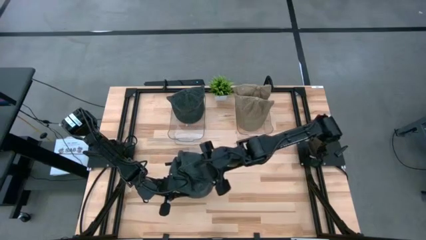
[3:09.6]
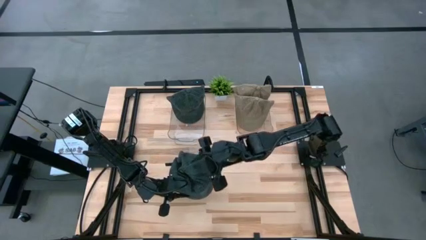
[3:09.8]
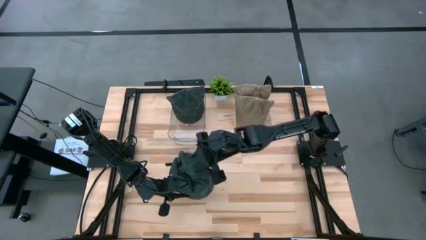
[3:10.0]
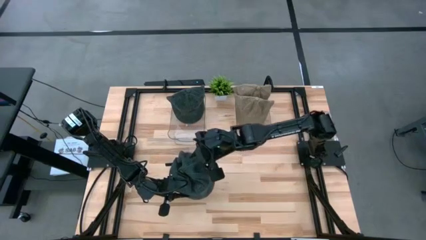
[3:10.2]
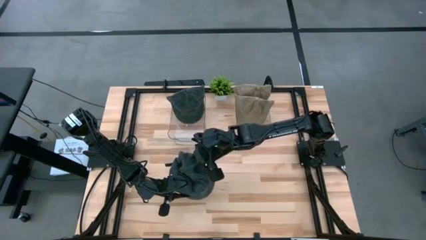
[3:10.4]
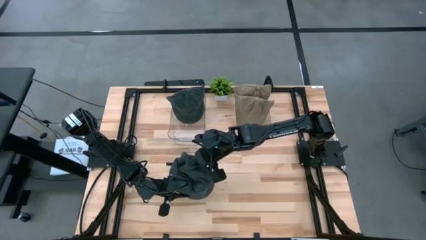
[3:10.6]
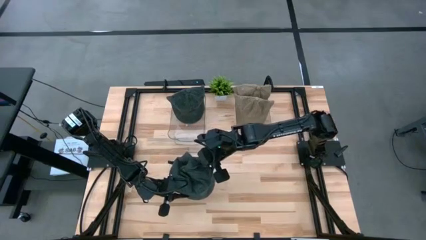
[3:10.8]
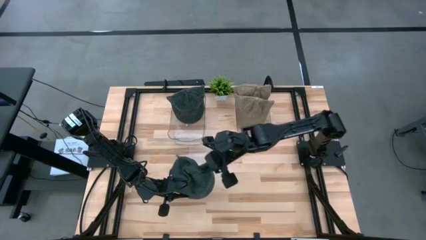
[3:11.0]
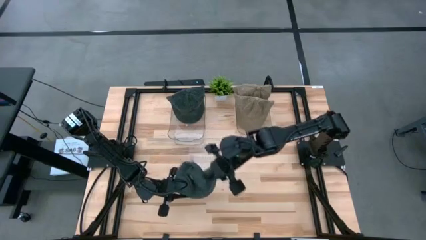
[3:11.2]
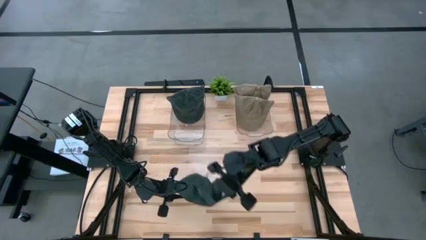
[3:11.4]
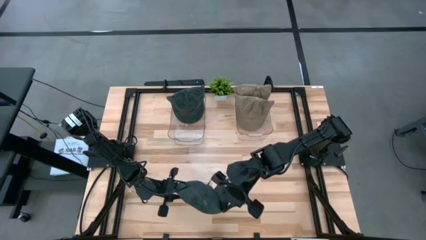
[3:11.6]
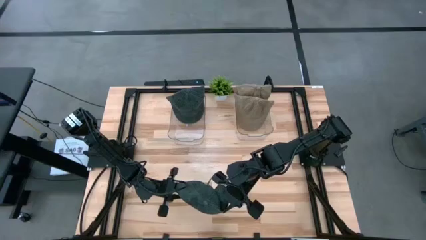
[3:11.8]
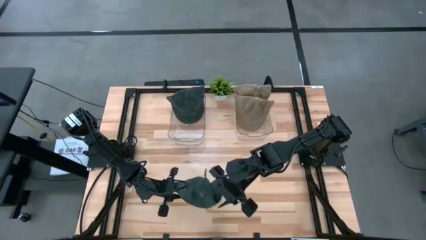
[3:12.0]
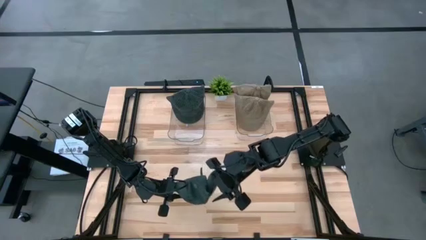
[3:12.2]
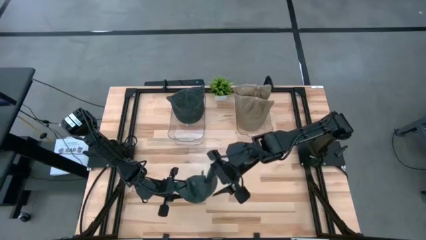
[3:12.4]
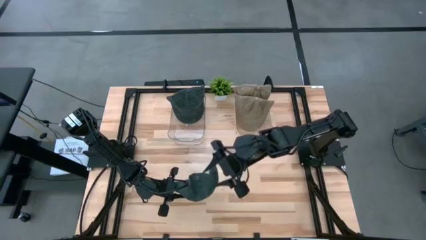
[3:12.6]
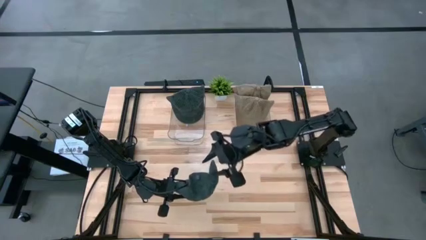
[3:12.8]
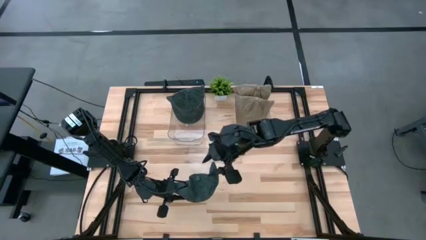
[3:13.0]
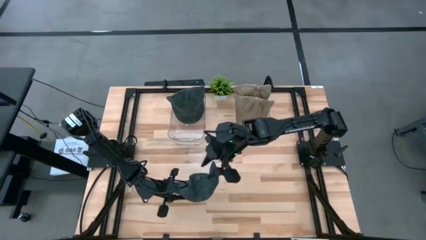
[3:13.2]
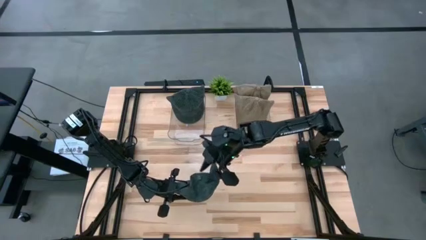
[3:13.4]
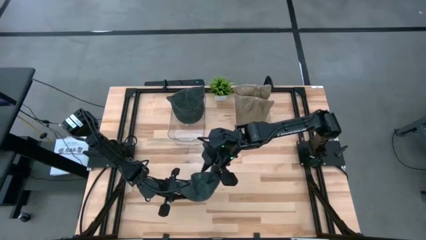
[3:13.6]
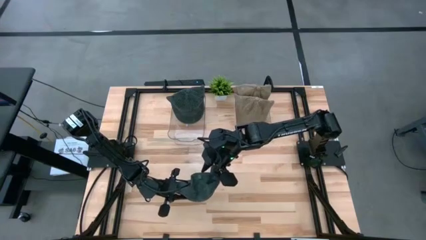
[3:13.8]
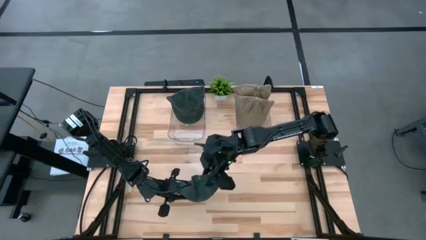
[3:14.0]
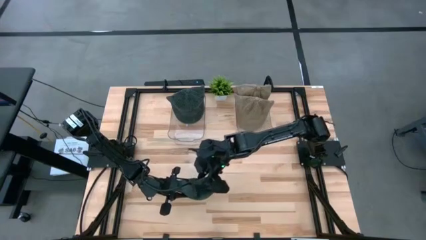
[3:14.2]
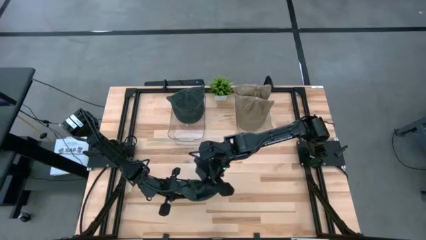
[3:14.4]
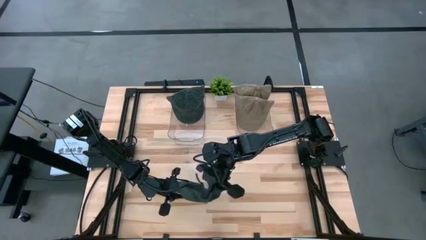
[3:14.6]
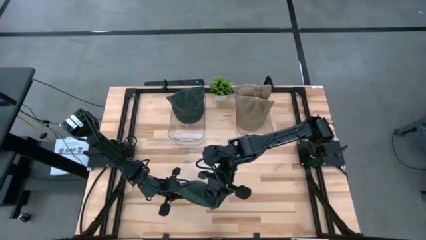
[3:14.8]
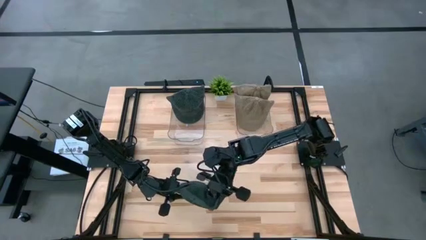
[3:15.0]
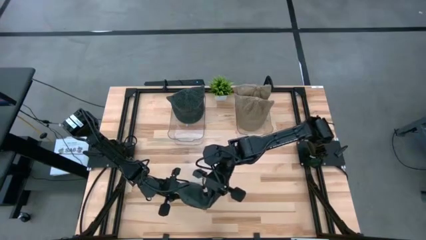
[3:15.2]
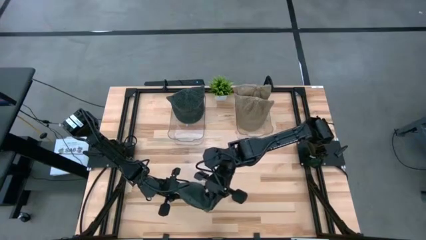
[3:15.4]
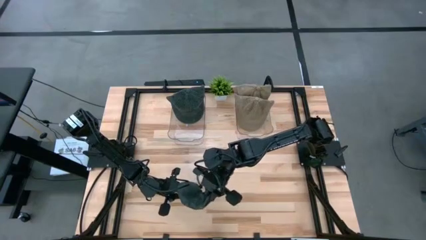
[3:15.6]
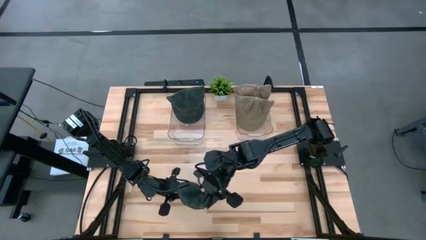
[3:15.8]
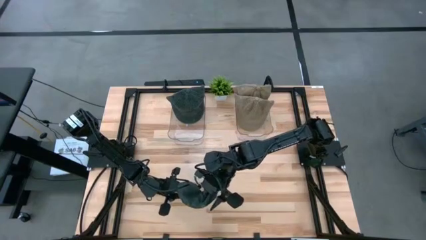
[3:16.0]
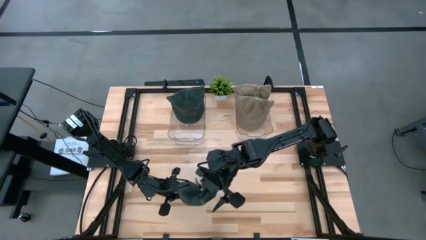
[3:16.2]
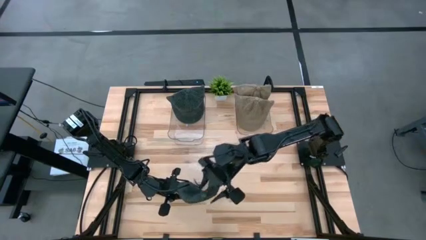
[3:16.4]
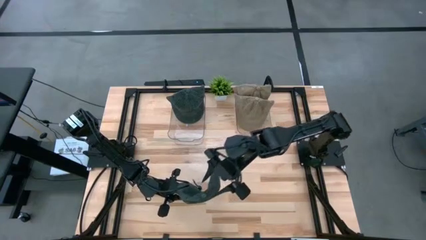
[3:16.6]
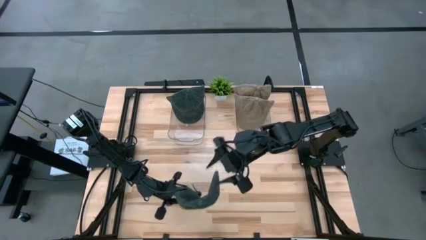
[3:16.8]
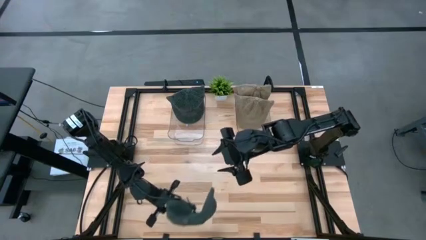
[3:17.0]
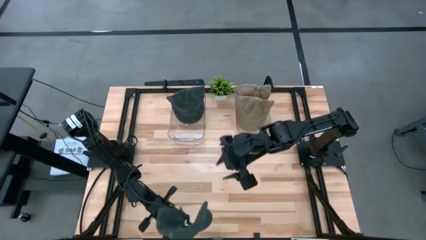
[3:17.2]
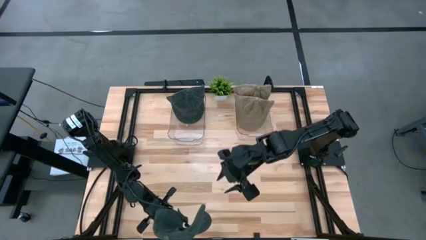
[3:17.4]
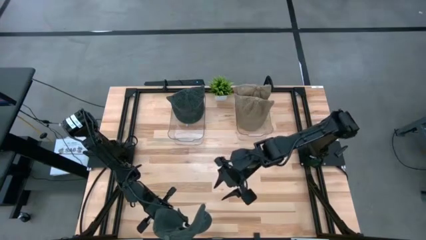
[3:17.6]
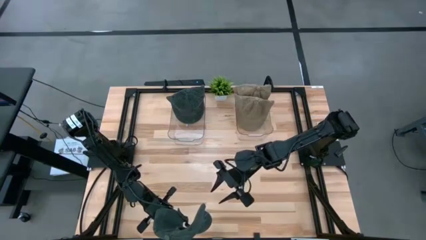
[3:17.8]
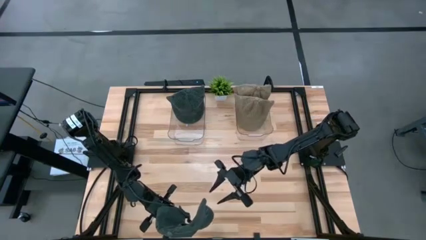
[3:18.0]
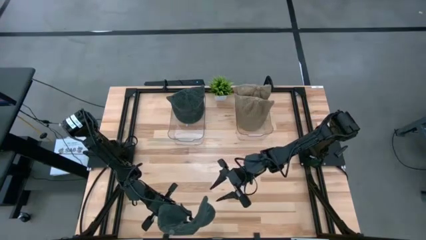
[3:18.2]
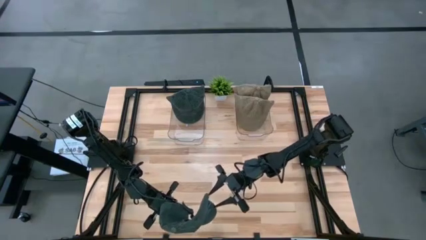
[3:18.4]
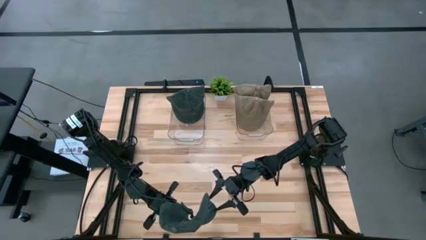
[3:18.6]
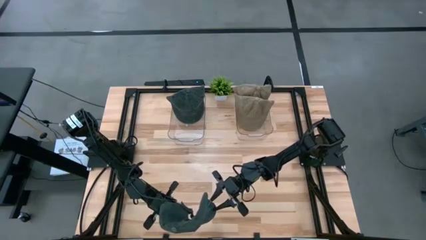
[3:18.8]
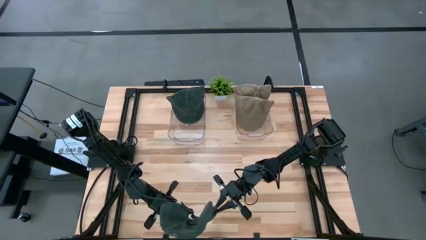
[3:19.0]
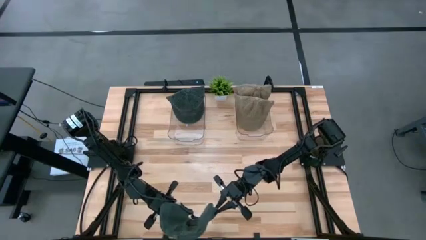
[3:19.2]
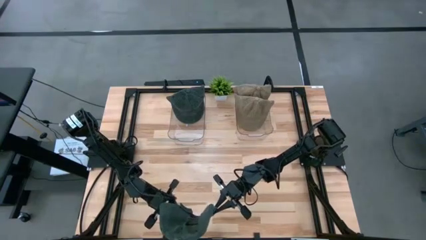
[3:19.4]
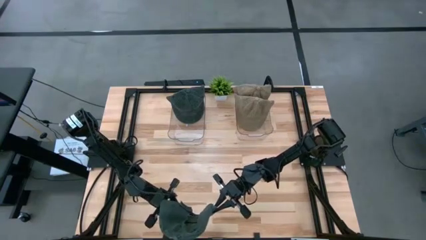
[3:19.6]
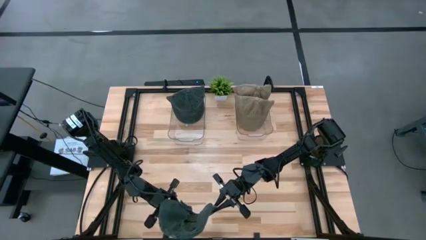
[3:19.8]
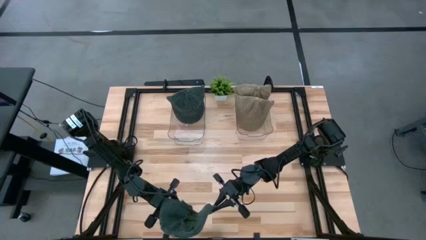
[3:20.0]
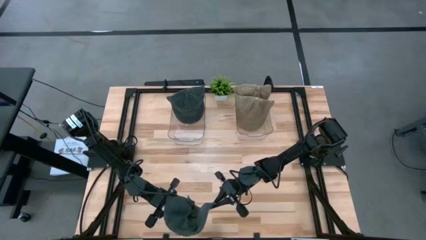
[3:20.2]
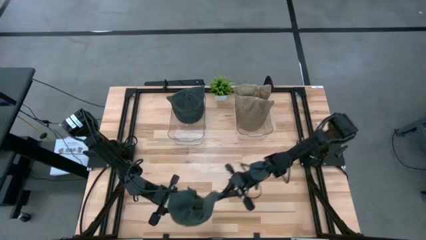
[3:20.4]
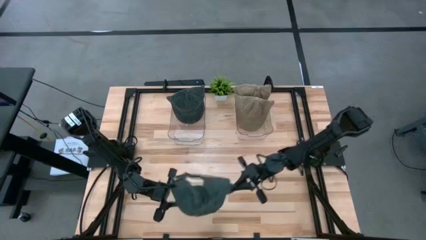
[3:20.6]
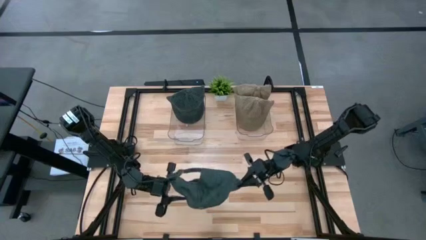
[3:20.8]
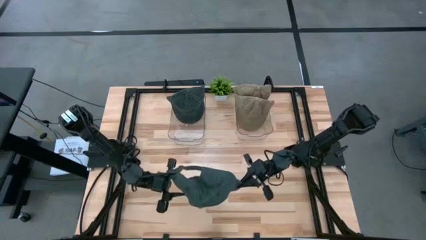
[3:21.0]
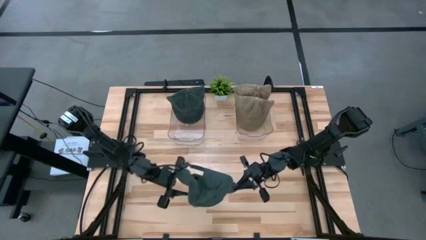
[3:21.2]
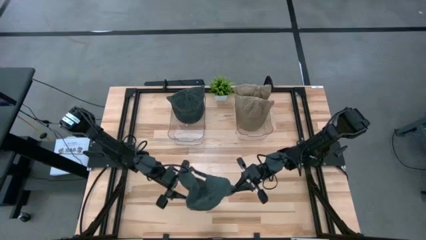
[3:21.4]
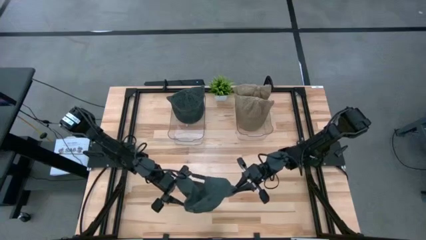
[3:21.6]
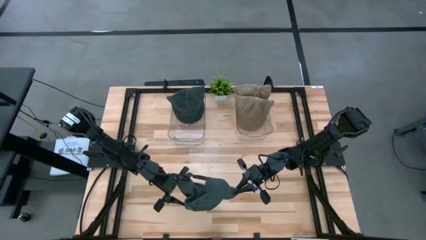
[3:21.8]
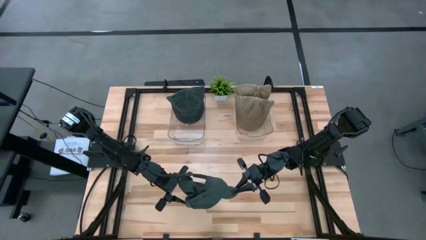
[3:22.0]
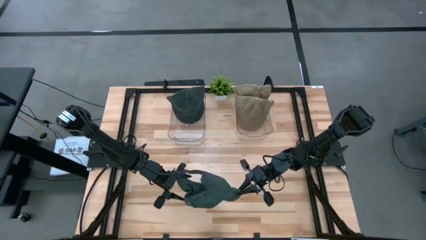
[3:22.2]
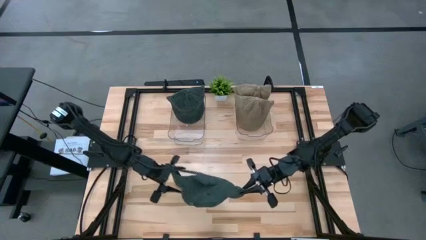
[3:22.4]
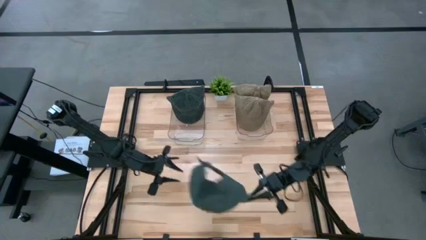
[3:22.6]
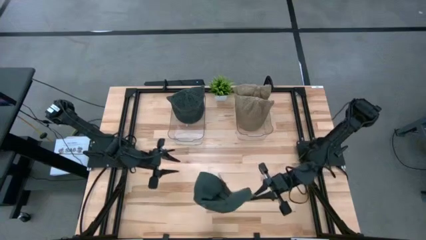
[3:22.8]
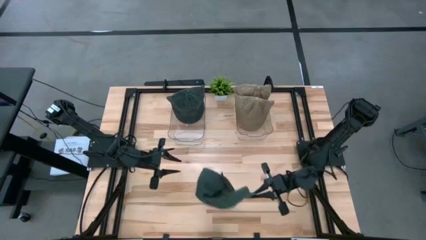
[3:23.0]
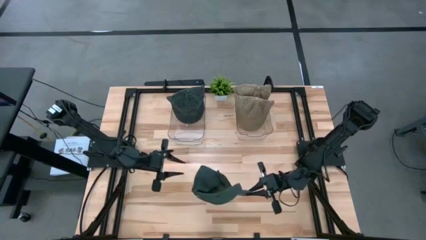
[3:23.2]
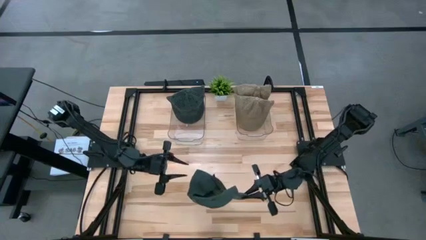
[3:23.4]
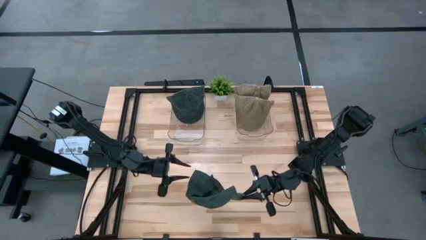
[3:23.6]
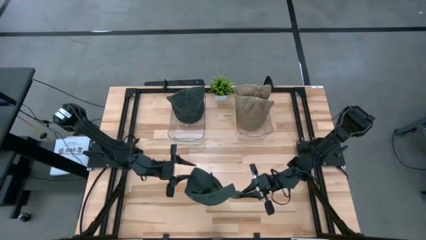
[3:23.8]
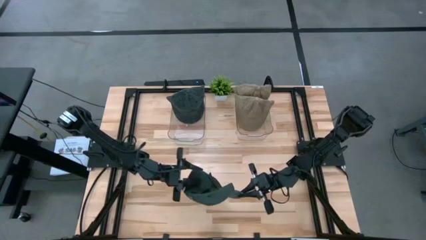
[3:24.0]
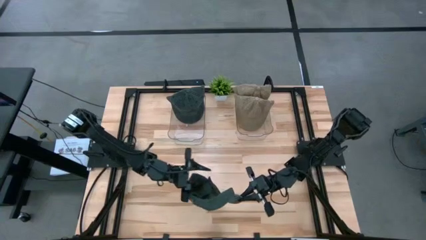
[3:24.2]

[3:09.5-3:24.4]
Task: Pick & Place hat
Put the black cap into the left transparent container
